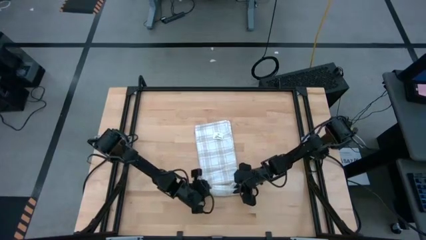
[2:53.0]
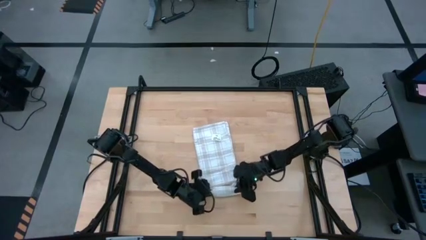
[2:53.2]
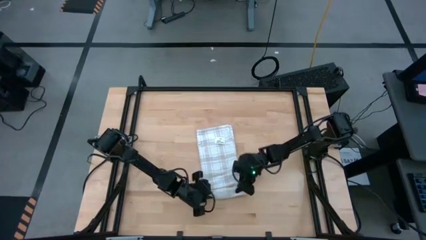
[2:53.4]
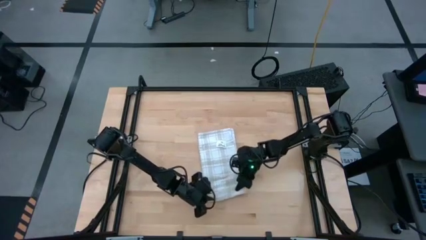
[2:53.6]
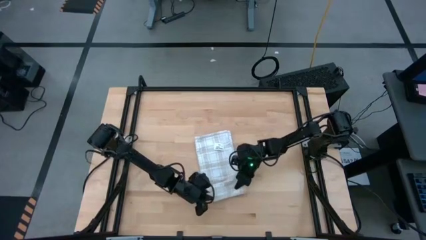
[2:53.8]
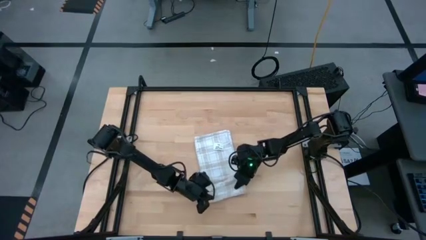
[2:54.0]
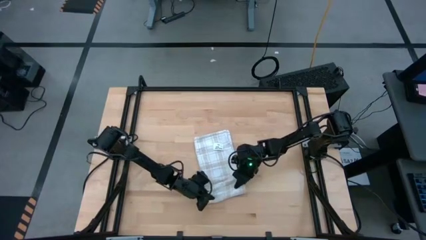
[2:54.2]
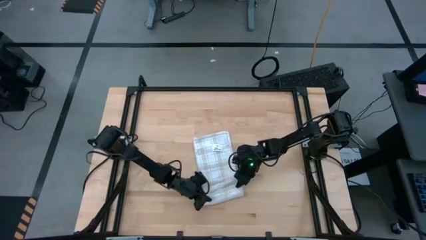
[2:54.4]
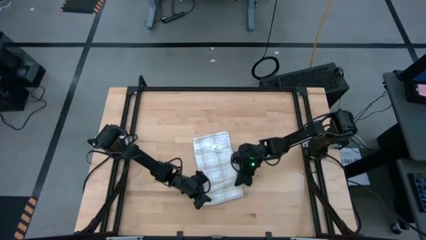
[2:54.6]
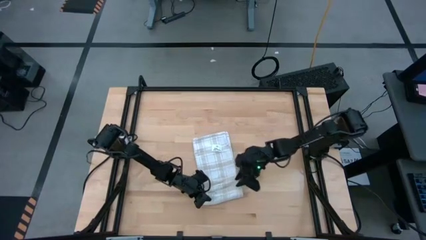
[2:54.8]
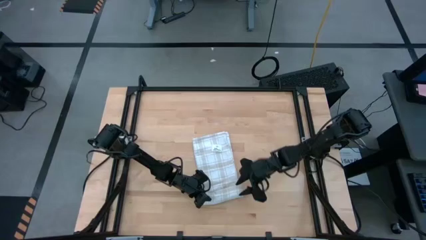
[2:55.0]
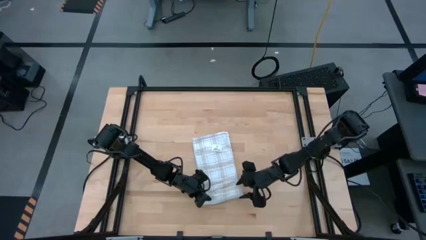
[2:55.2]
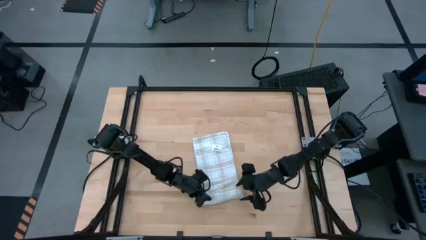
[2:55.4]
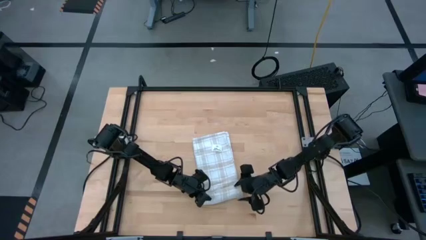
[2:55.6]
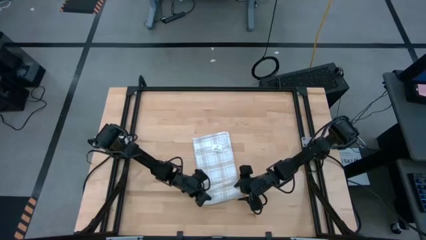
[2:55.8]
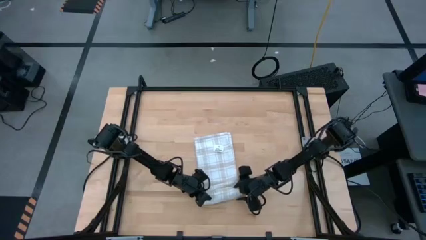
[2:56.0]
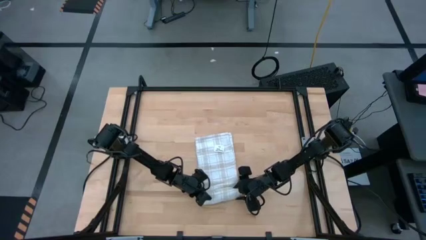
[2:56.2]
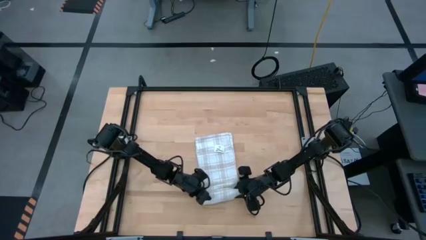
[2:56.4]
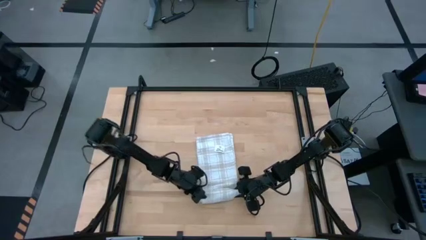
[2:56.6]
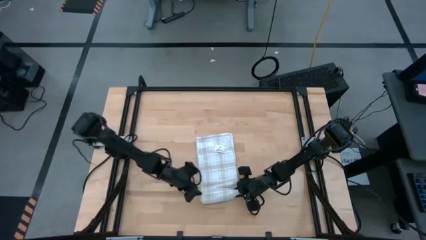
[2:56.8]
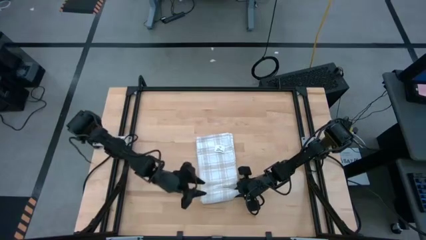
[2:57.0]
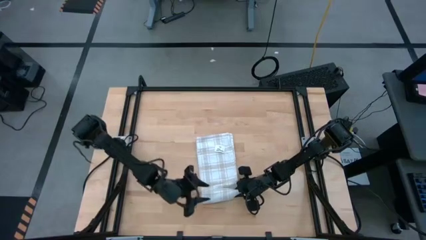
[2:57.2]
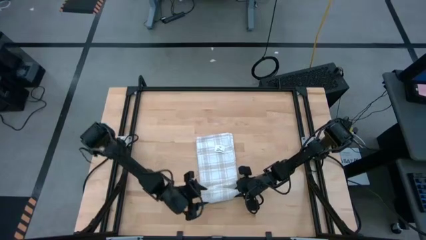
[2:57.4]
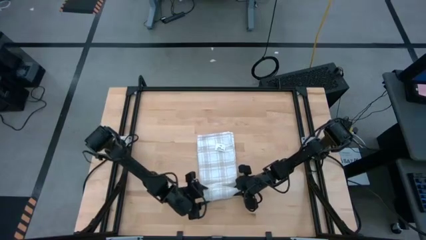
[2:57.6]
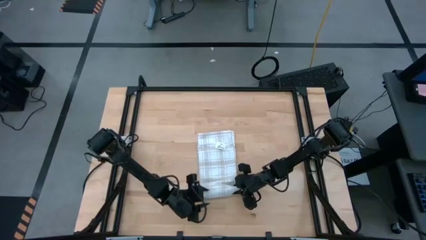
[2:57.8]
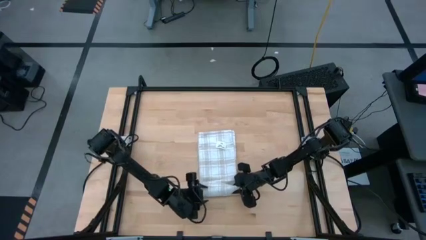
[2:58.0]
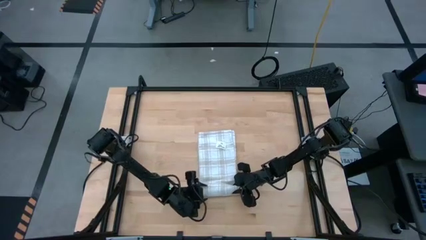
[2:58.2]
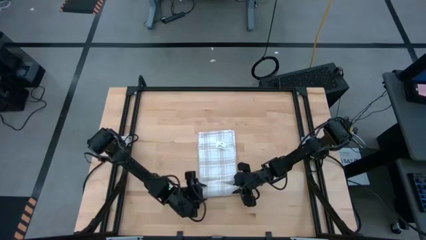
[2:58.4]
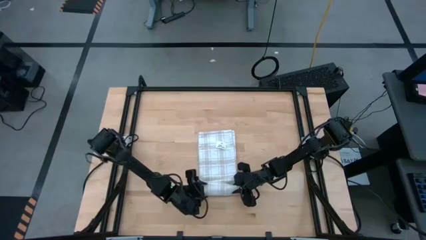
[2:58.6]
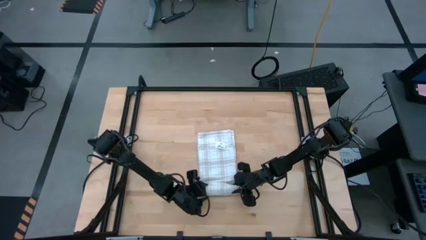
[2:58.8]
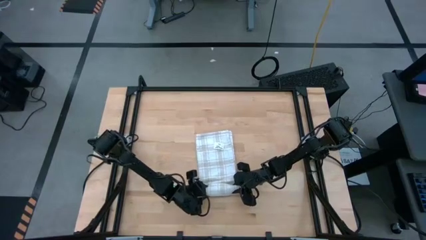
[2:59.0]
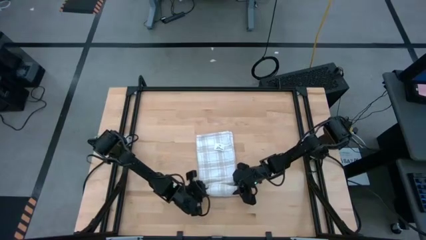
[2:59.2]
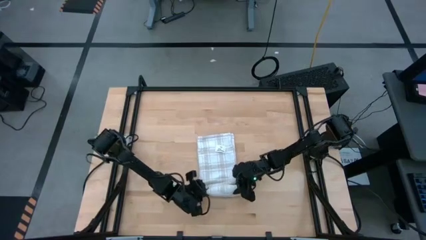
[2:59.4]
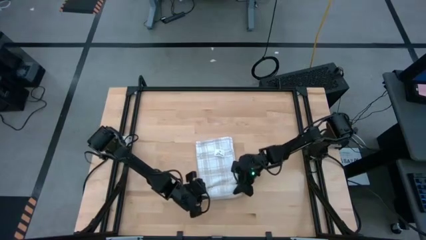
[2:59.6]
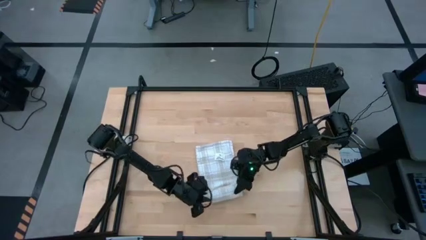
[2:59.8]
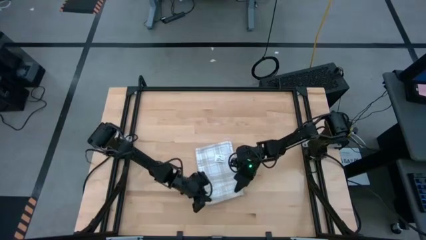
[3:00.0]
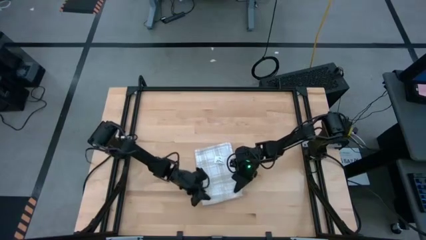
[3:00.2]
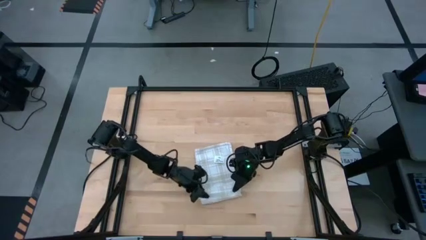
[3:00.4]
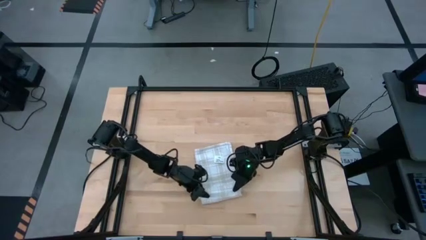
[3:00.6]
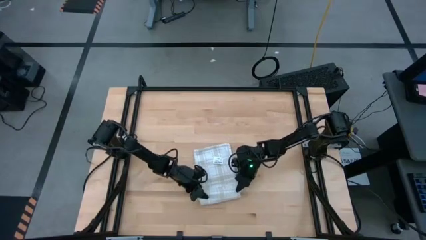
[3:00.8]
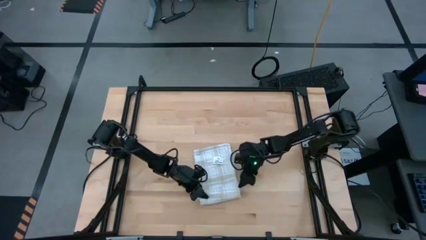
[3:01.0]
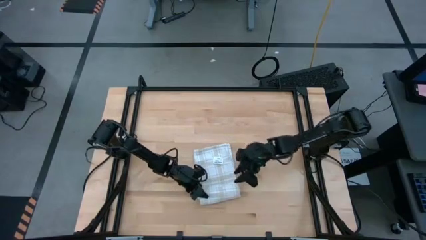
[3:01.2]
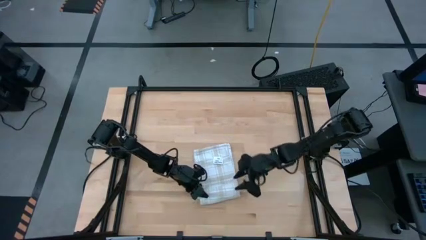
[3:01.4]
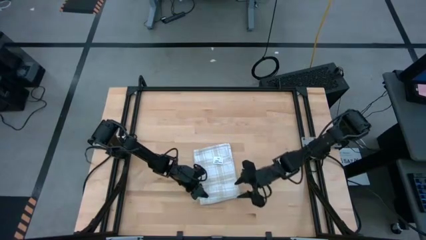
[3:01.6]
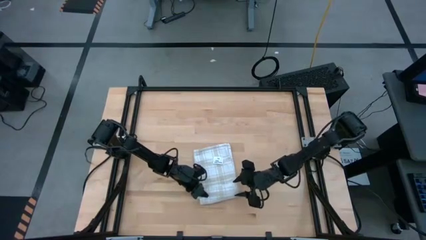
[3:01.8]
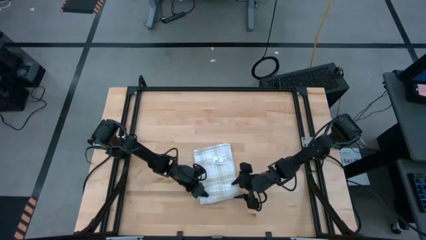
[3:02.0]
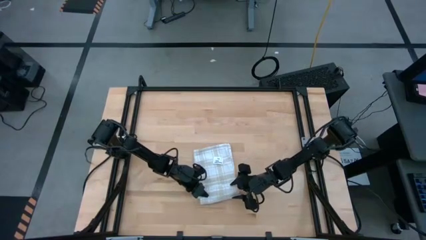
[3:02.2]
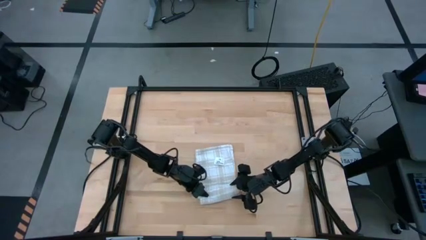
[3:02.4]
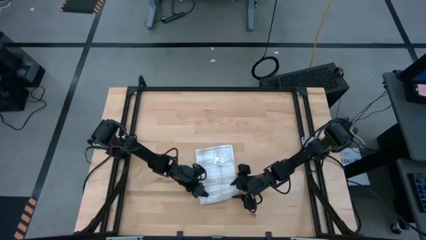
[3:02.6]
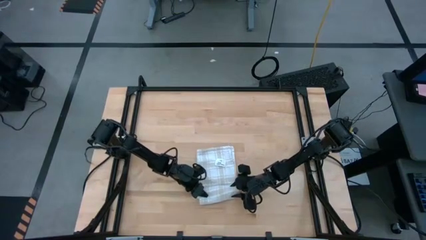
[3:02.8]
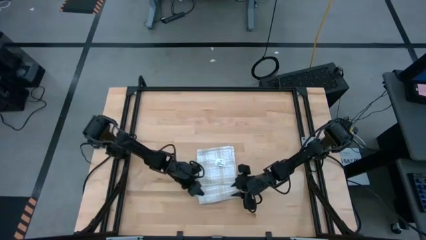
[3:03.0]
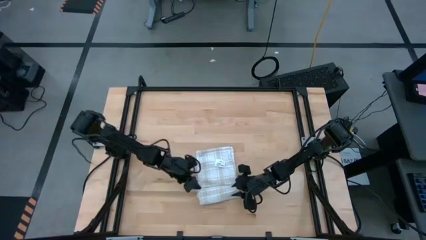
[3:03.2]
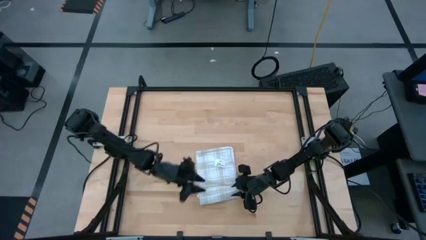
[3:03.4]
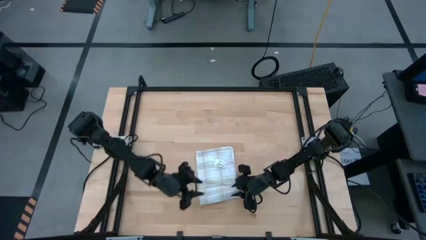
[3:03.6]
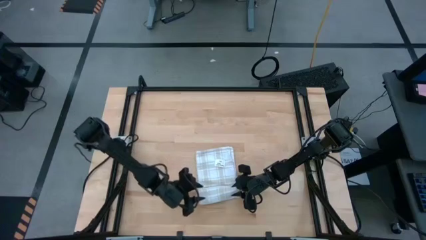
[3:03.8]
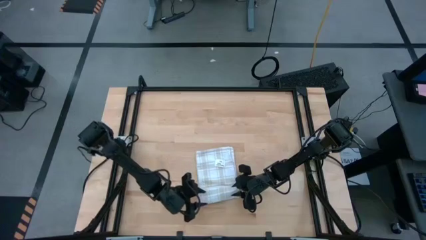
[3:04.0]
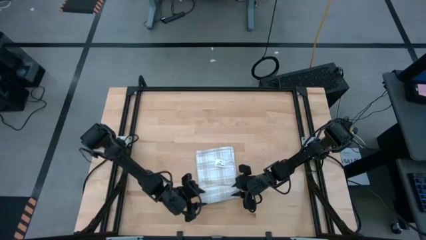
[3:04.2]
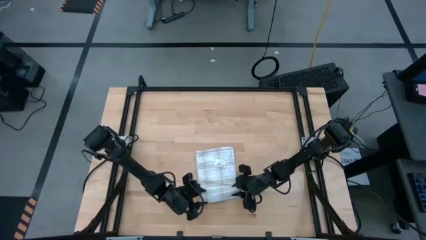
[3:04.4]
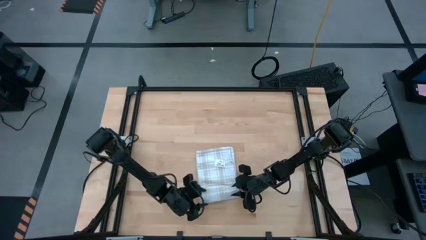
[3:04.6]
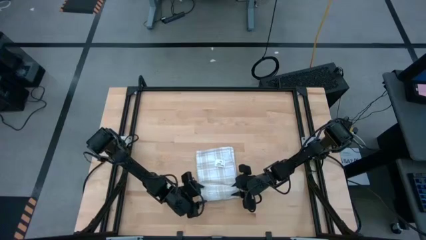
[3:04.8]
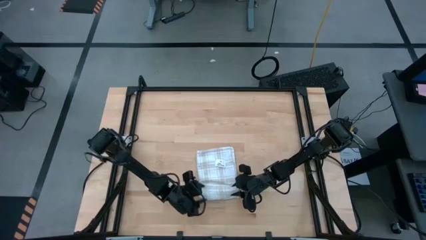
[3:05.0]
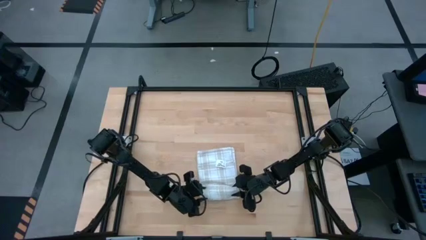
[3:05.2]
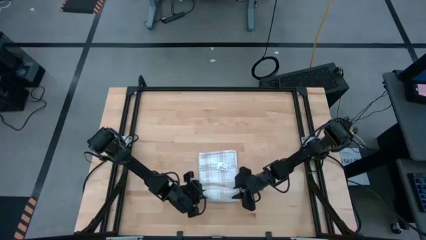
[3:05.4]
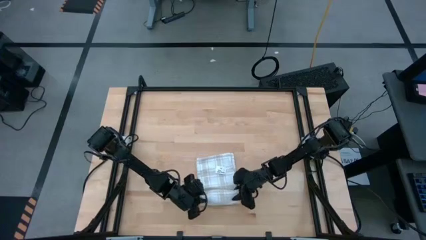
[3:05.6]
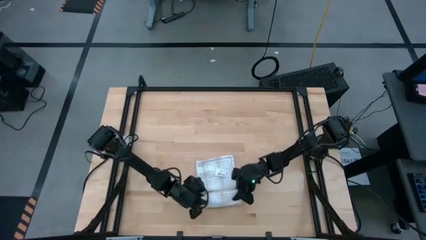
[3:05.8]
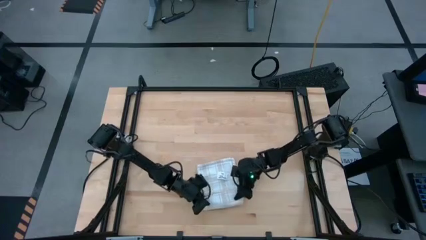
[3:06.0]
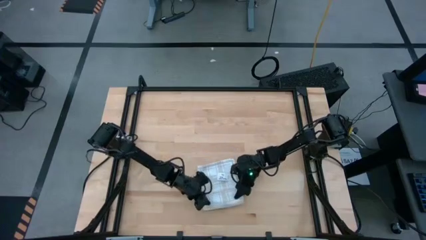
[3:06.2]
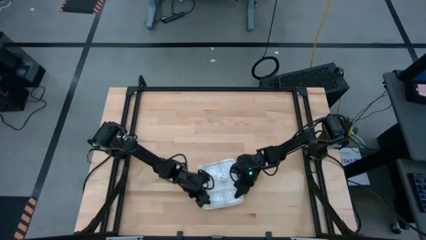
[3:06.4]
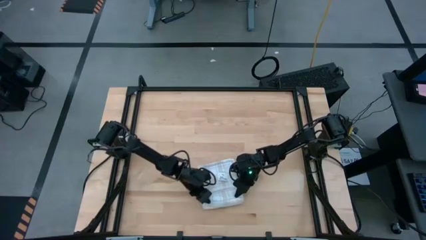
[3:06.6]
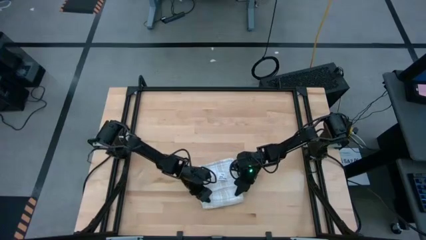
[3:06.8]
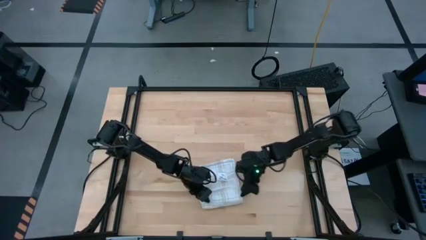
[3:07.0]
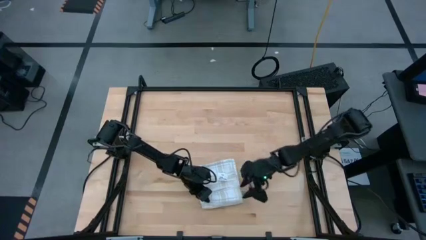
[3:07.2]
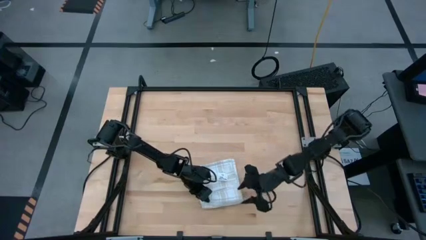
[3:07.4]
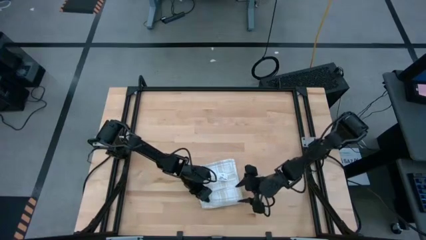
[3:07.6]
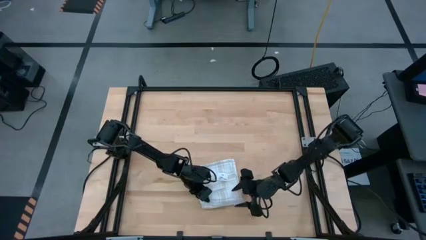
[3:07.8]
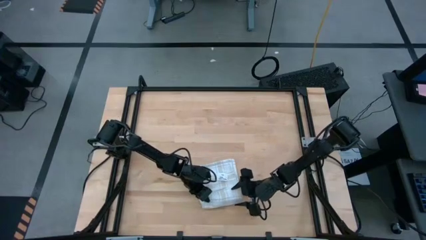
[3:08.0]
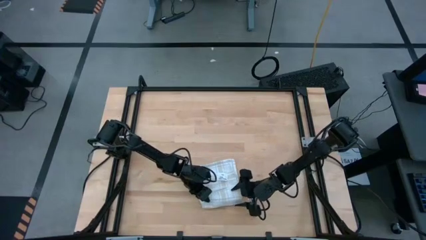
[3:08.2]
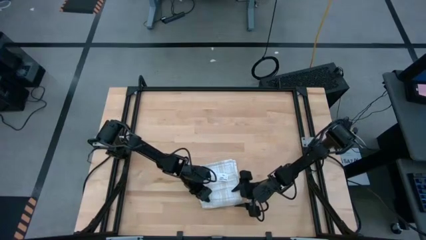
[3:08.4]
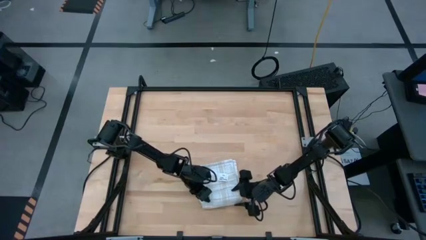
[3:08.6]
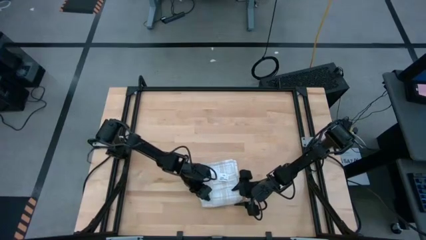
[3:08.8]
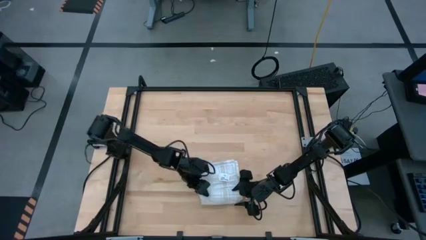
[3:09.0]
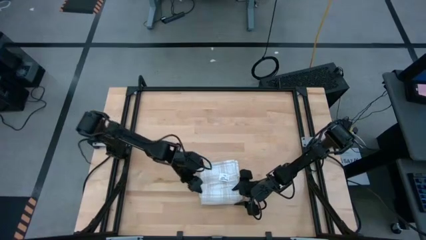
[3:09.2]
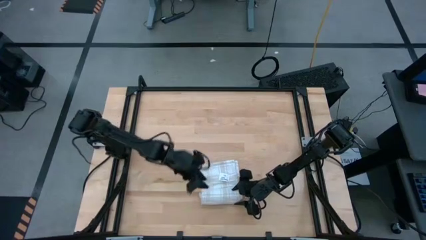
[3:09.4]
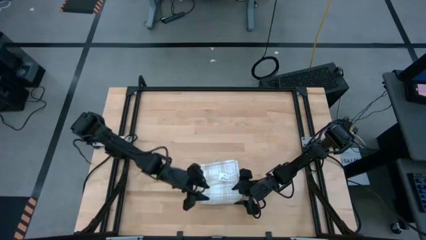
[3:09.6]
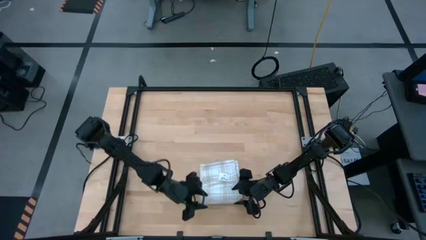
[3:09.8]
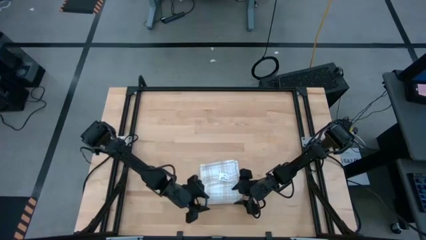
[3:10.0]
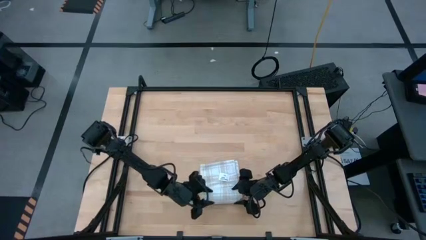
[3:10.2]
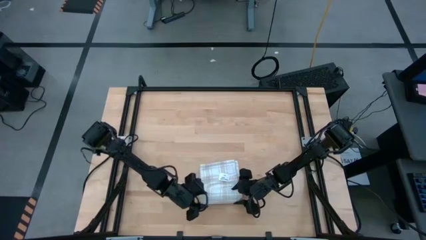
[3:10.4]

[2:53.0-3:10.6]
Task: Roll towel
Roll the towel
